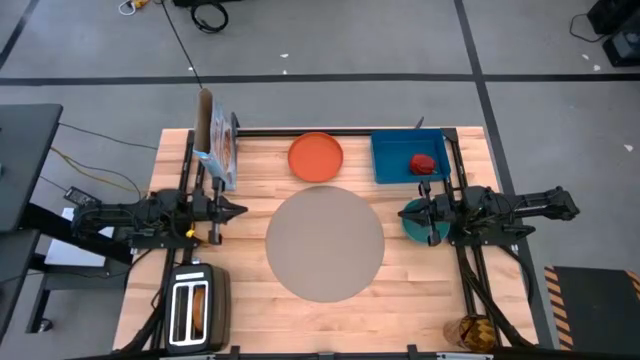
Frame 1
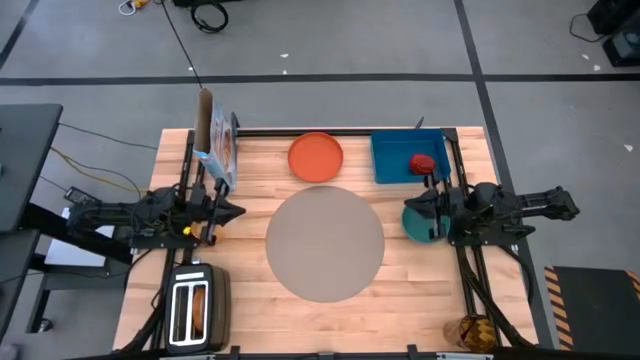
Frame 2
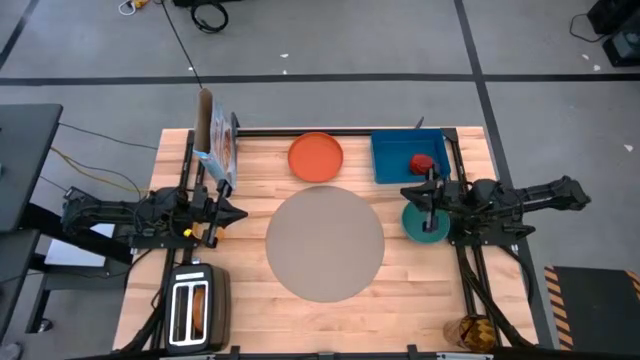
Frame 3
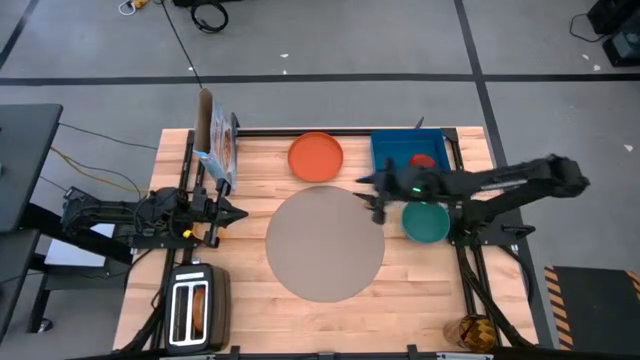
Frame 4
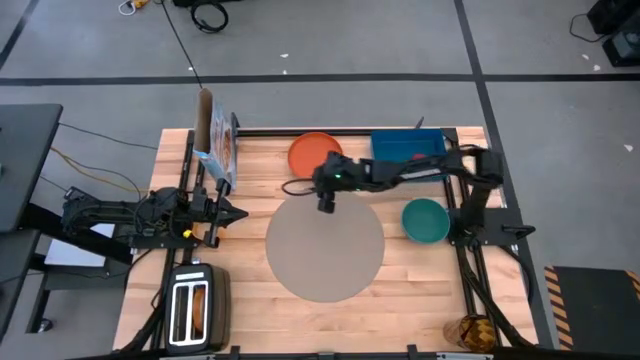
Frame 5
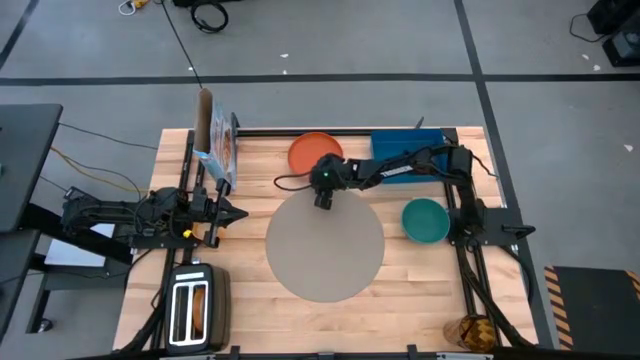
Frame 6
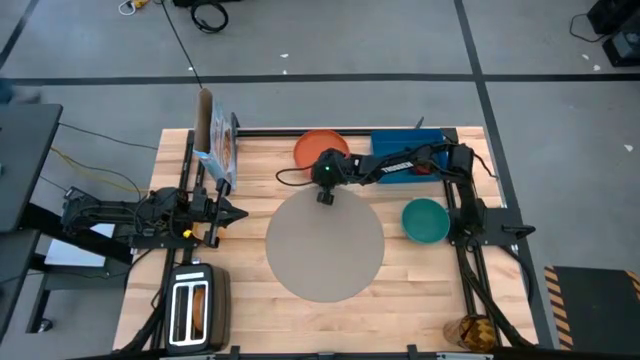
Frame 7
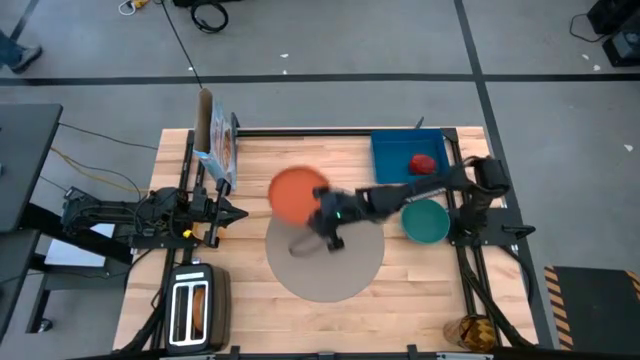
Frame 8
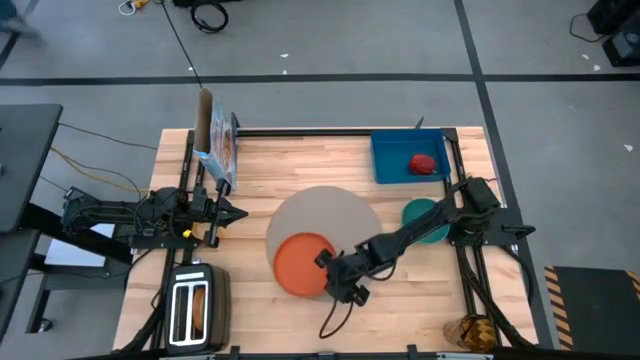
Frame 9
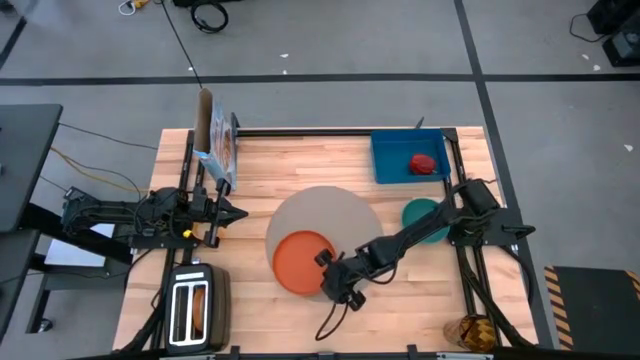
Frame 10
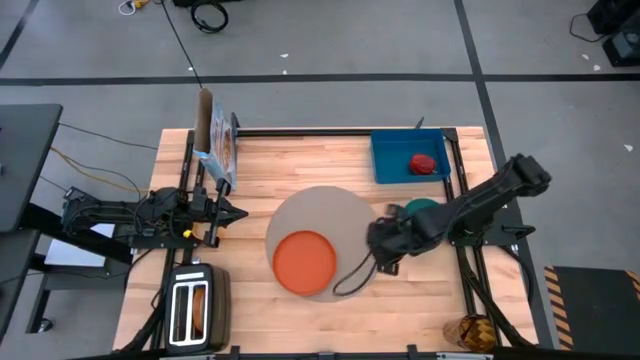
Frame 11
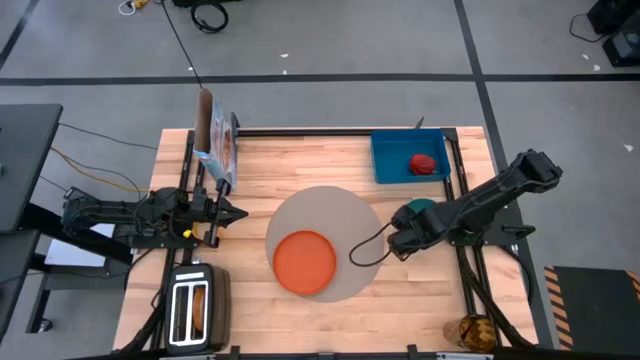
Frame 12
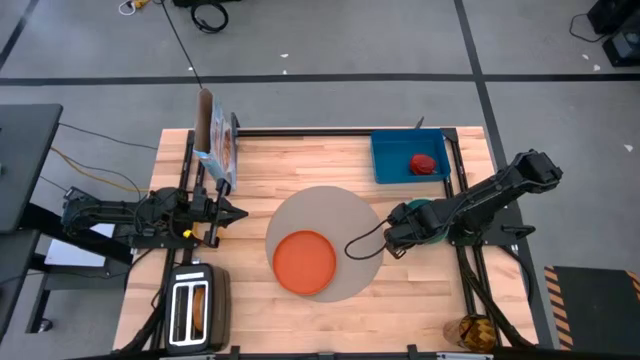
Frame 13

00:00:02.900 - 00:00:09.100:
Task: Arrange a breakfast setting
Put the orange plate on the round table mat

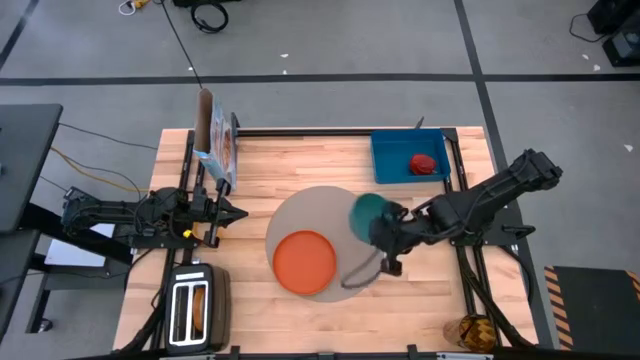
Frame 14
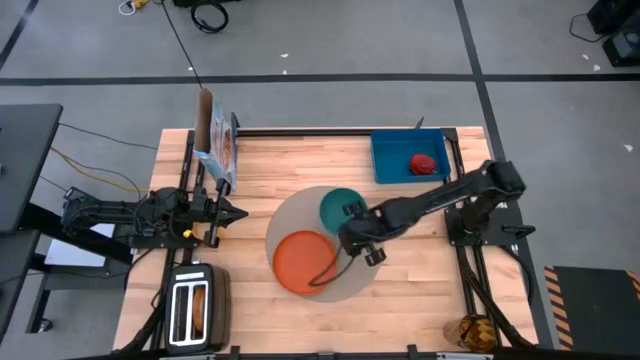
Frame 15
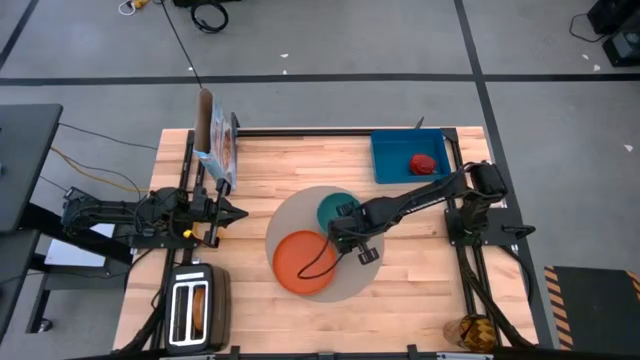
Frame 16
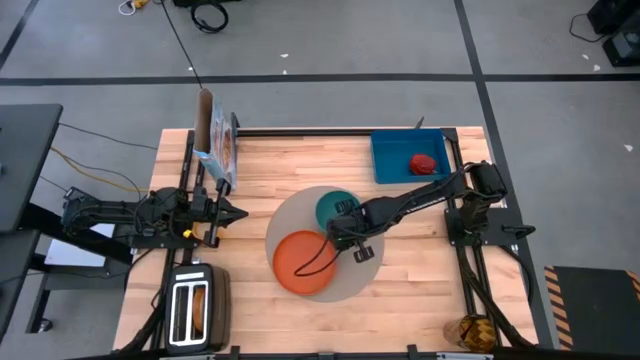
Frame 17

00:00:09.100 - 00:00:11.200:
Put the blue bowl on the round table mat

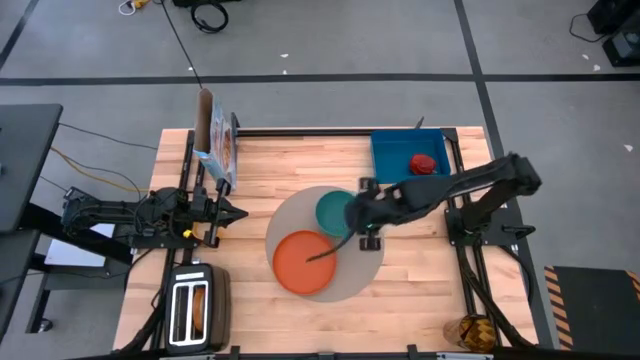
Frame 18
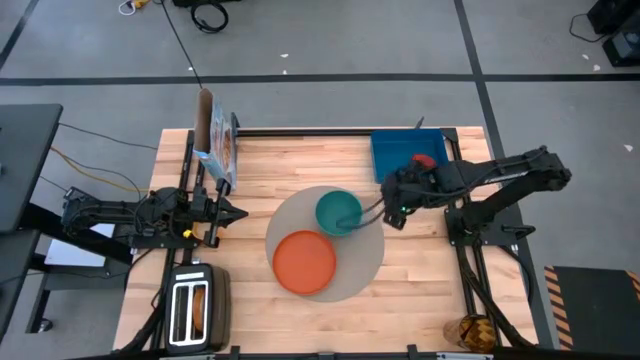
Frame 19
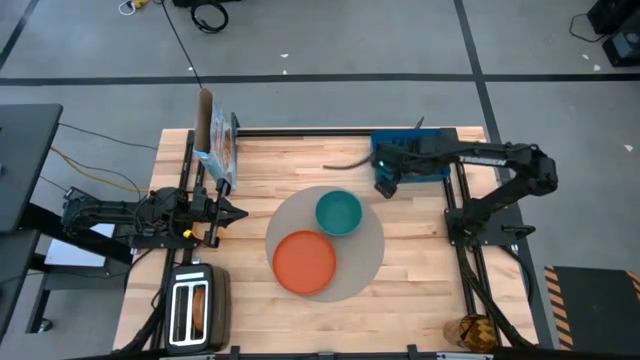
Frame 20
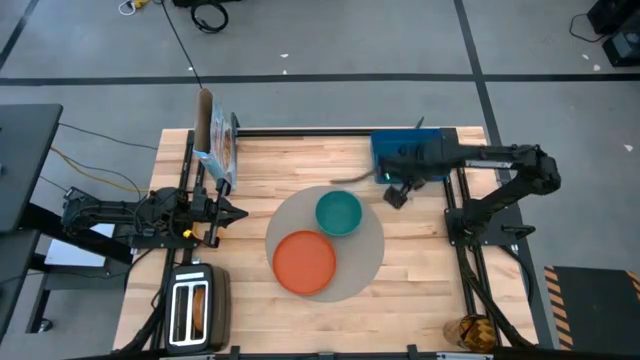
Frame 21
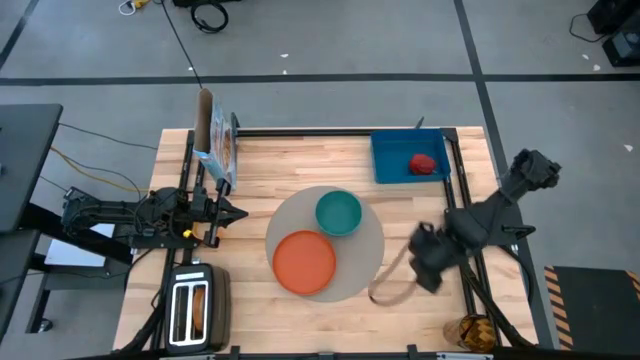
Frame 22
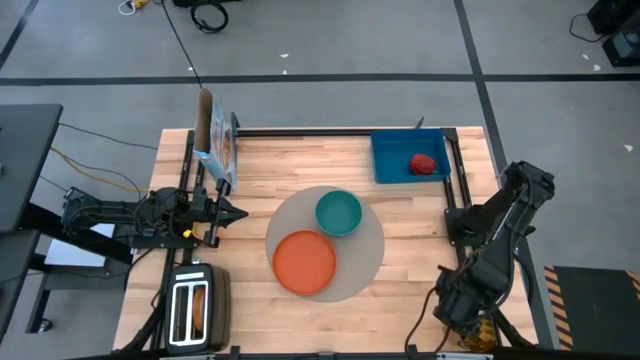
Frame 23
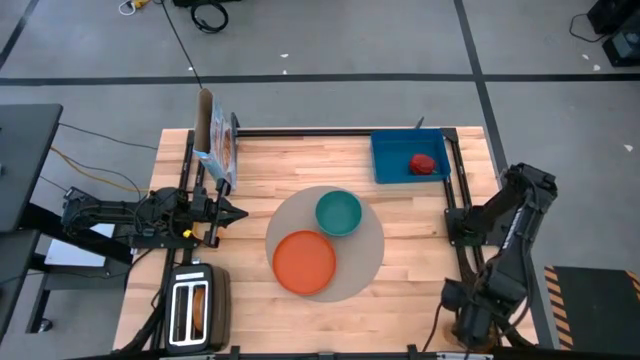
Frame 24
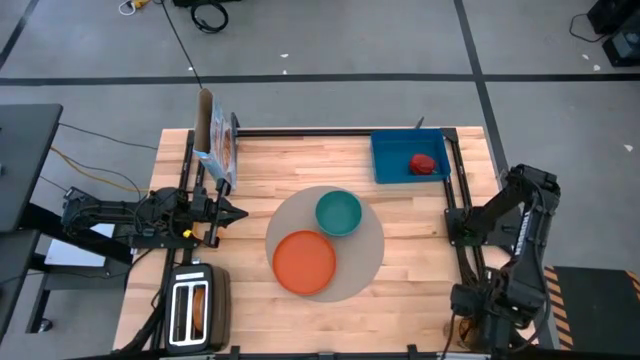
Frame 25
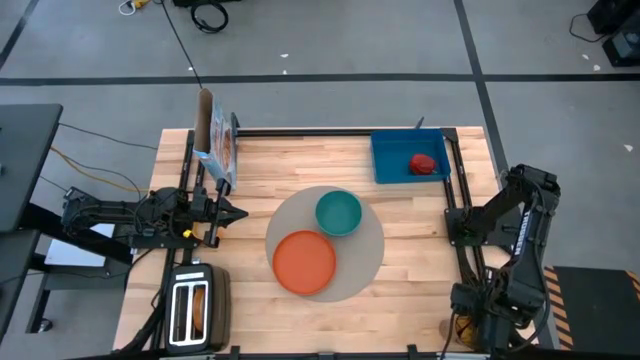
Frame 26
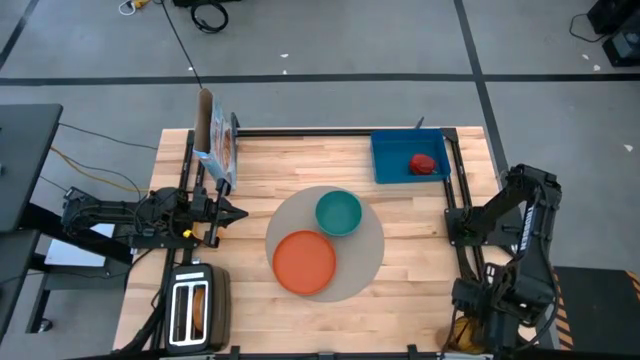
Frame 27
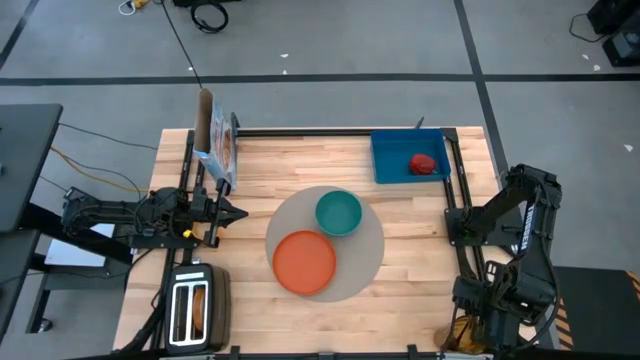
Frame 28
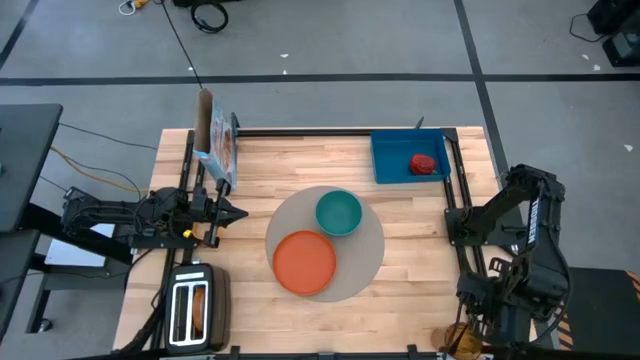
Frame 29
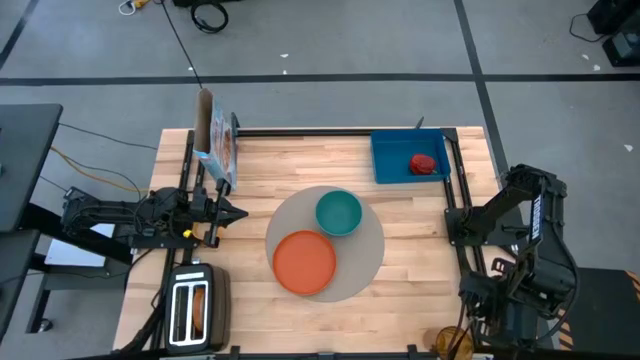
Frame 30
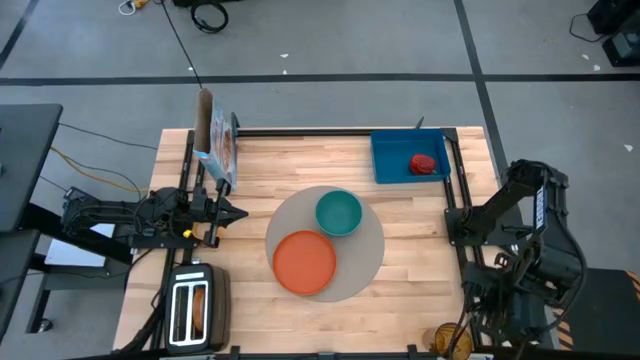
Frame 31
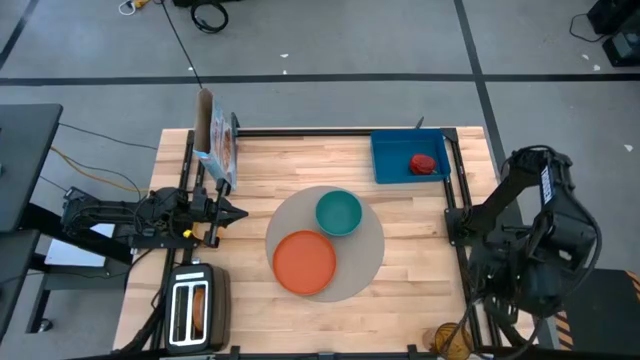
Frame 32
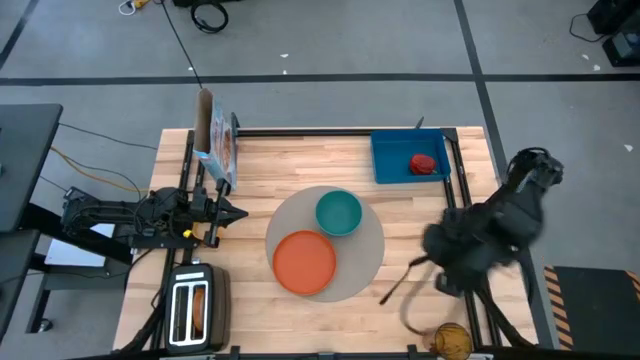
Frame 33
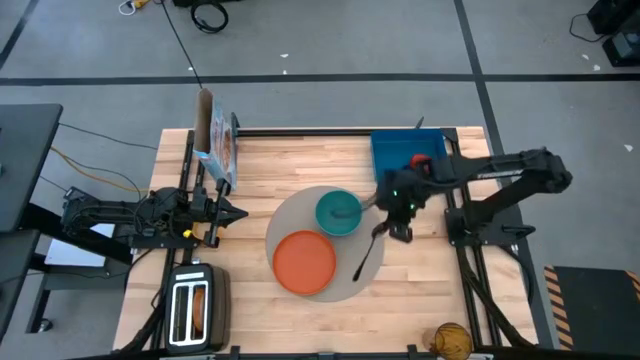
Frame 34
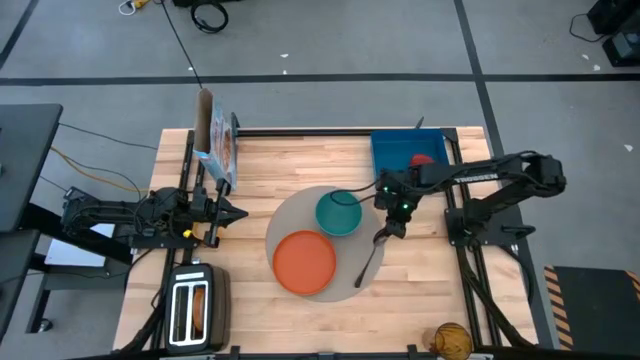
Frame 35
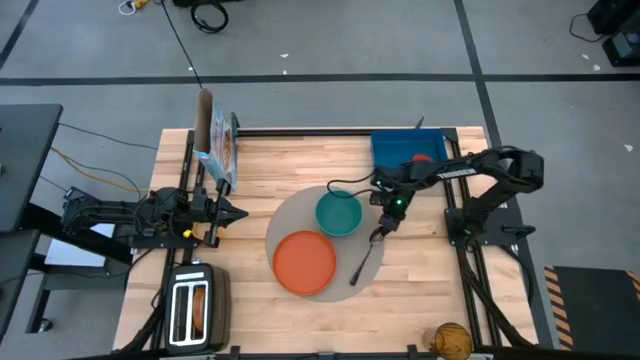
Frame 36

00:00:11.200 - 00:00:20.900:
Put the spoon on the middle left round table mat

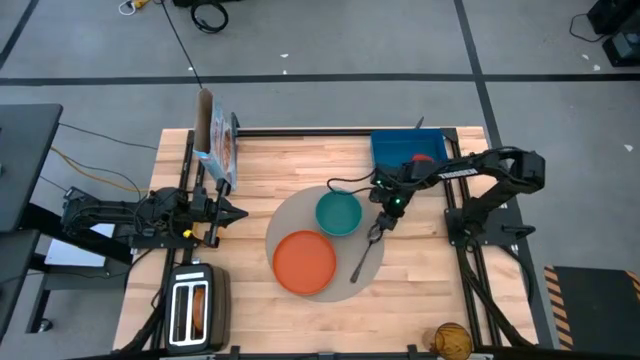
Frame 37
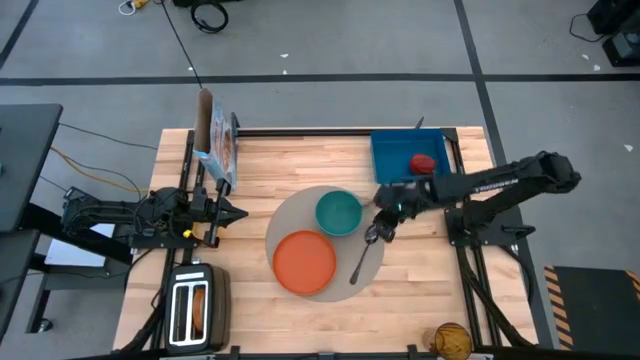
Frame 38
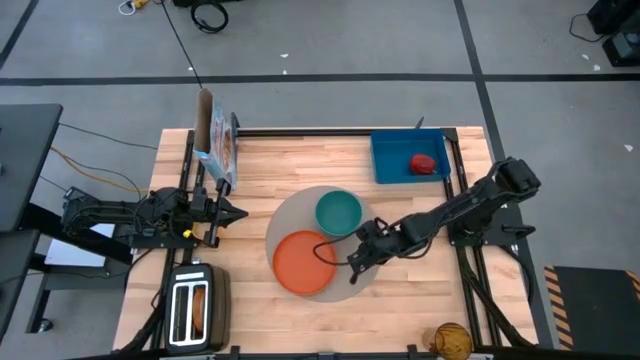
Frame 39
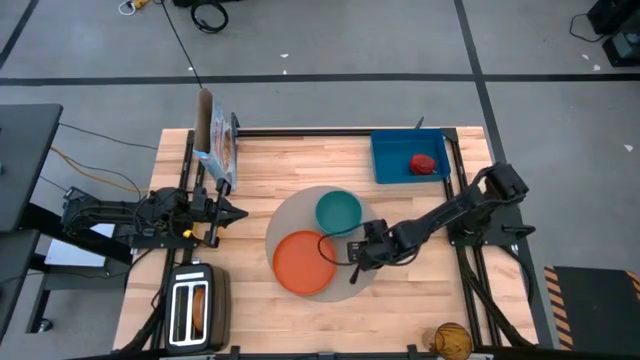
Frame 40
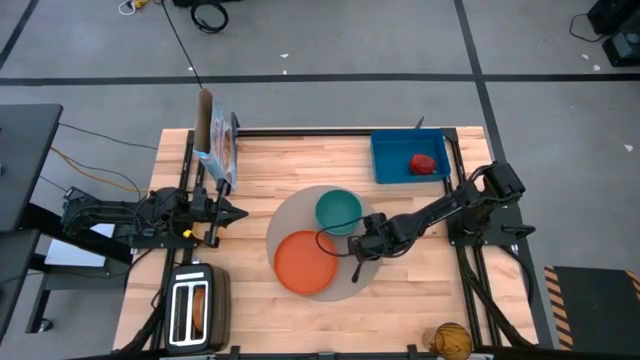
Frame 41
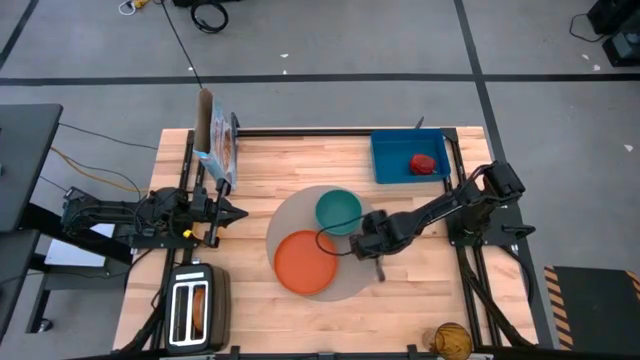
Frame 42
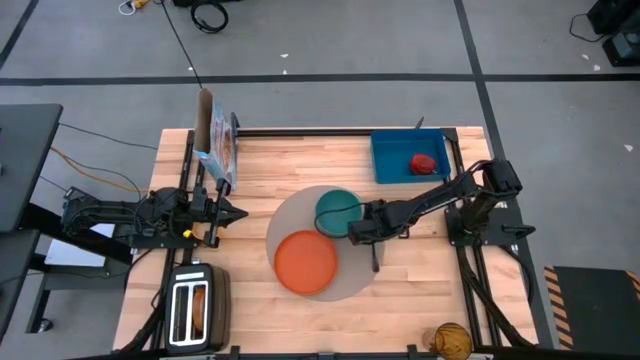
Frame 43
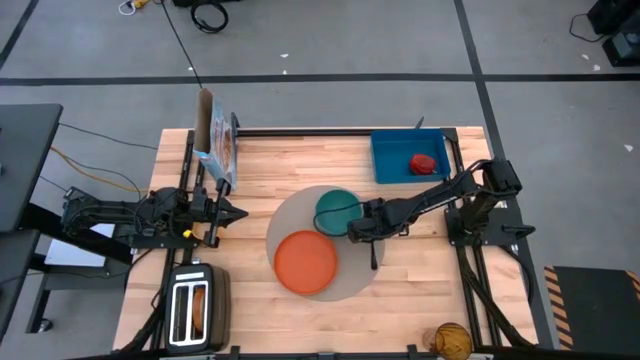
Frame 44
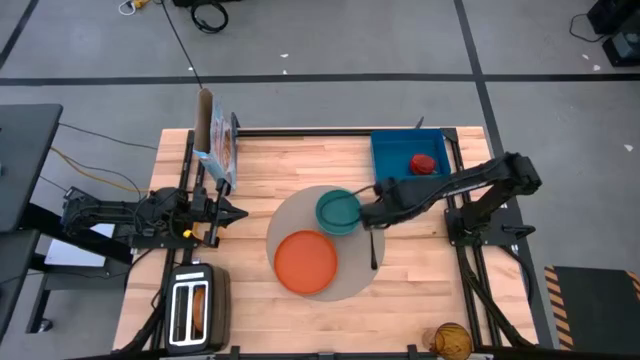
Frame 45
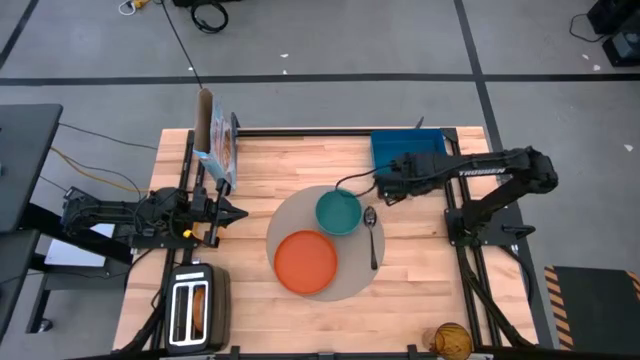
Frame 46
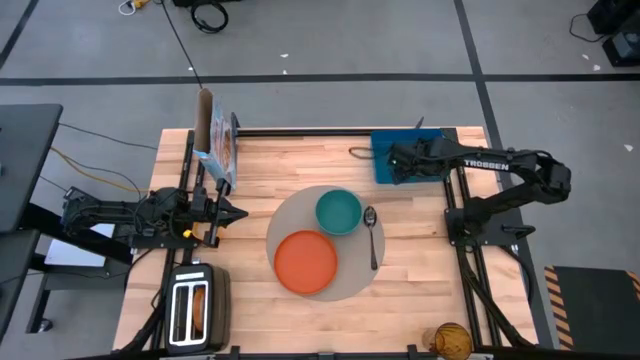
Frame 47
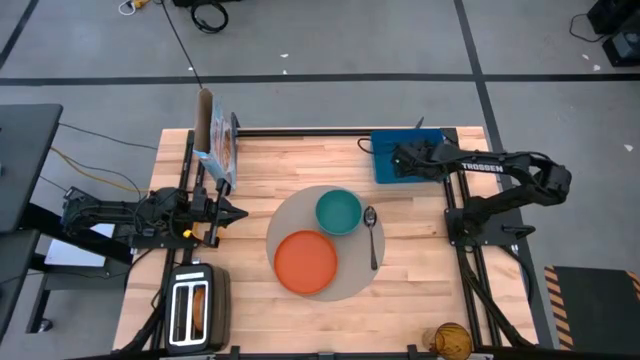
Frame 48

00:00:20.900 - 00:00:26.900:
Adjust the spoon on the middle left round table mat
